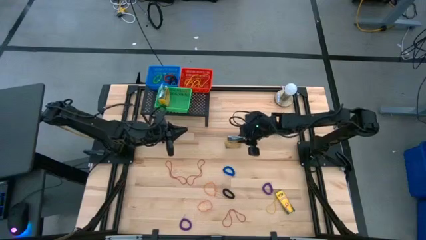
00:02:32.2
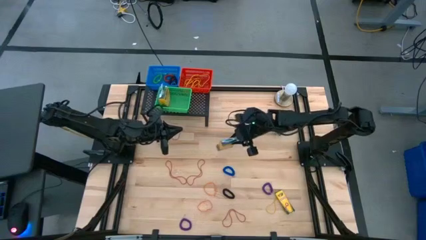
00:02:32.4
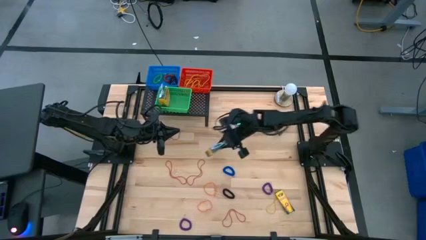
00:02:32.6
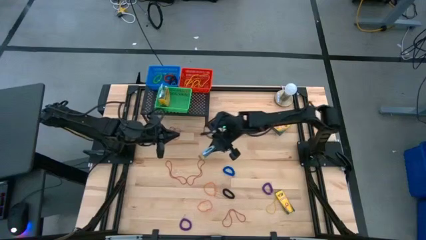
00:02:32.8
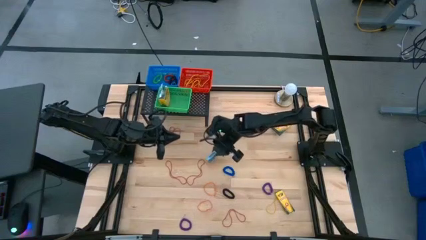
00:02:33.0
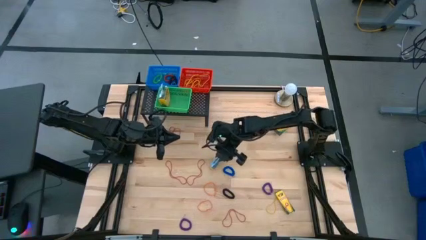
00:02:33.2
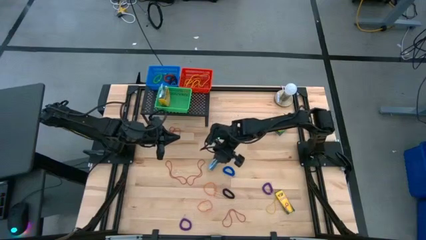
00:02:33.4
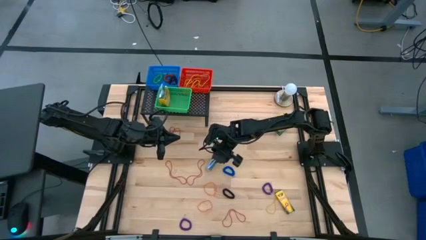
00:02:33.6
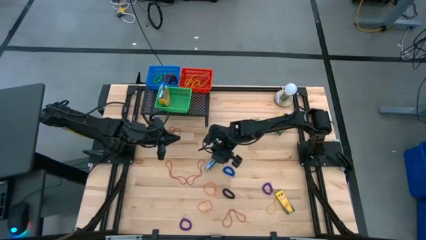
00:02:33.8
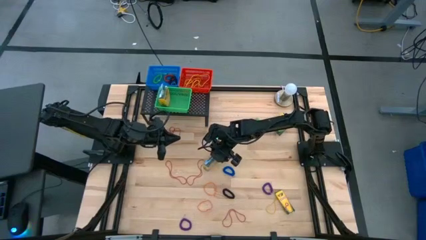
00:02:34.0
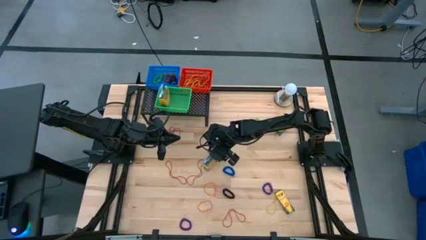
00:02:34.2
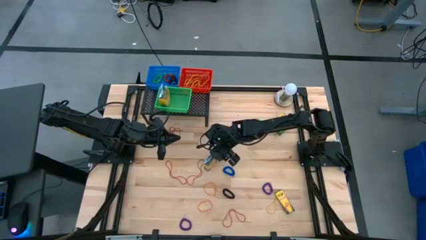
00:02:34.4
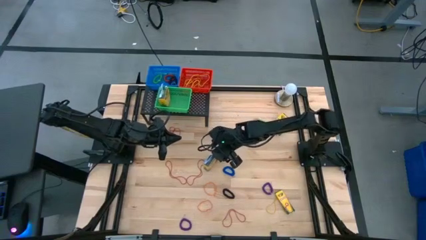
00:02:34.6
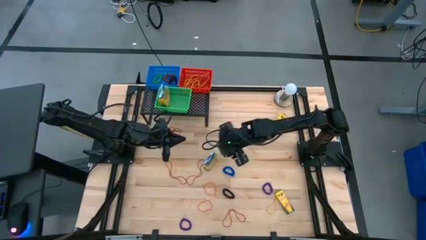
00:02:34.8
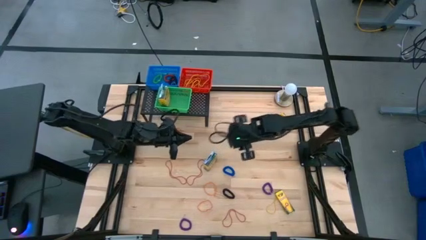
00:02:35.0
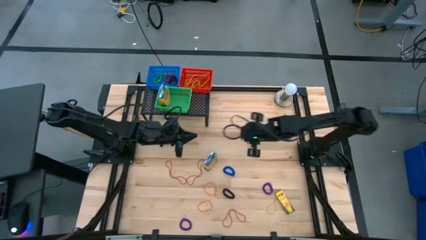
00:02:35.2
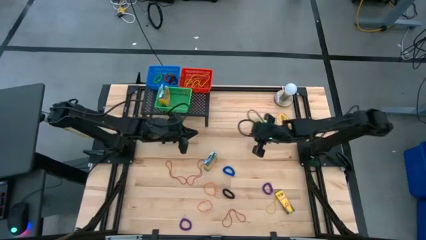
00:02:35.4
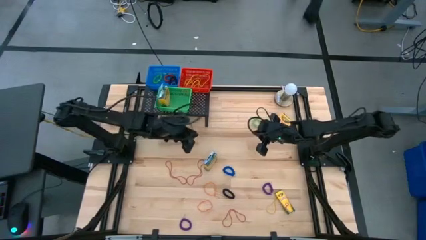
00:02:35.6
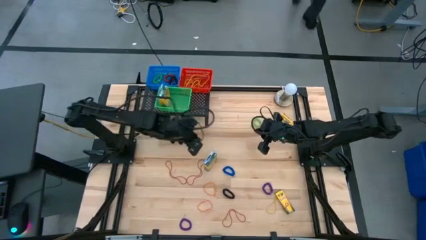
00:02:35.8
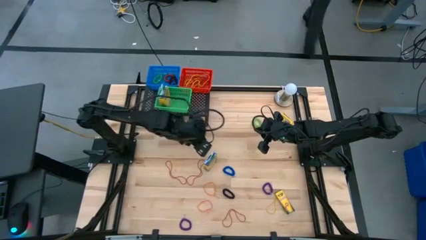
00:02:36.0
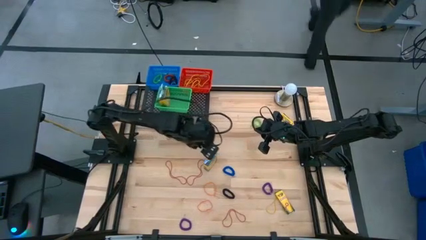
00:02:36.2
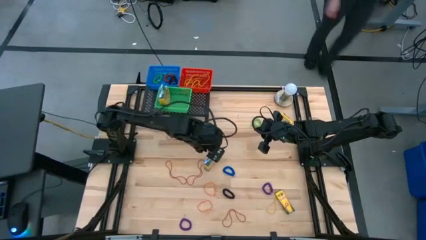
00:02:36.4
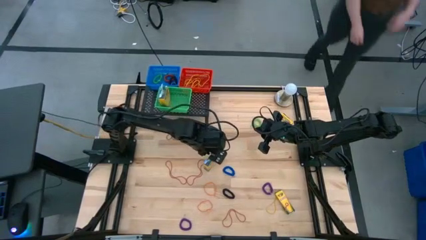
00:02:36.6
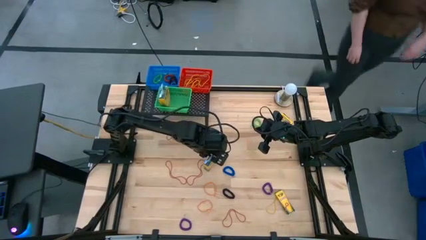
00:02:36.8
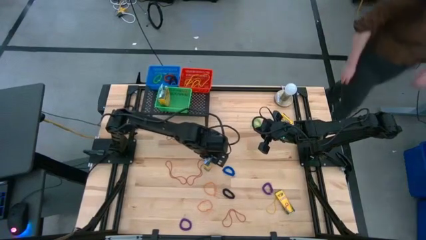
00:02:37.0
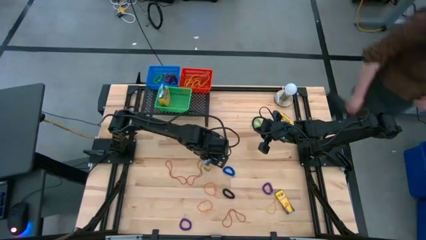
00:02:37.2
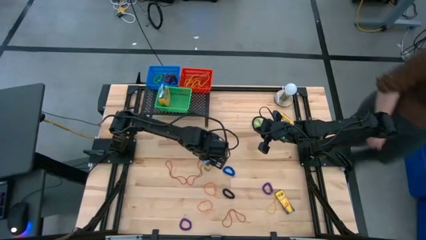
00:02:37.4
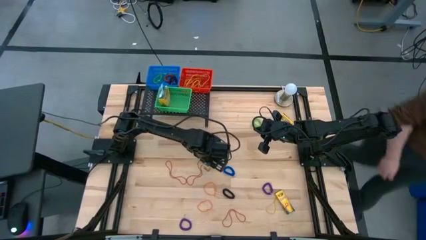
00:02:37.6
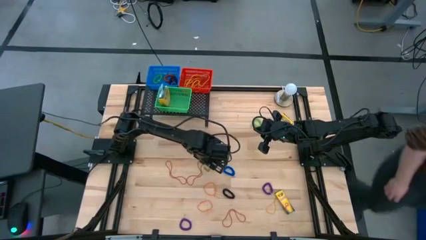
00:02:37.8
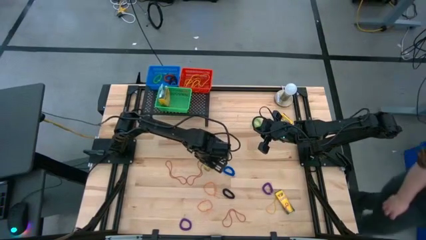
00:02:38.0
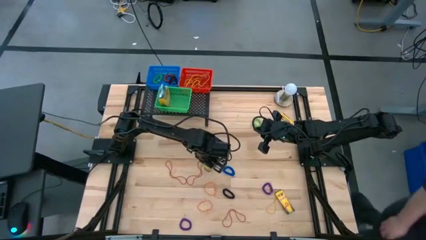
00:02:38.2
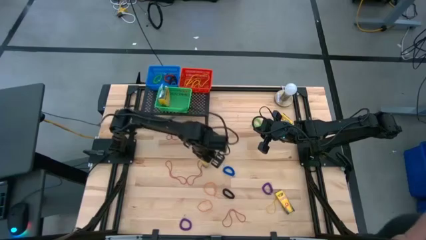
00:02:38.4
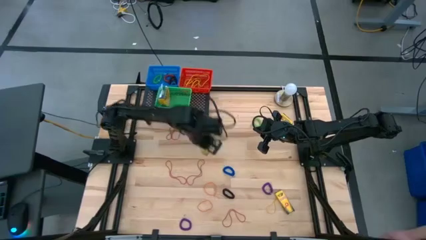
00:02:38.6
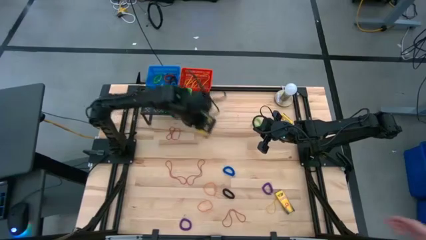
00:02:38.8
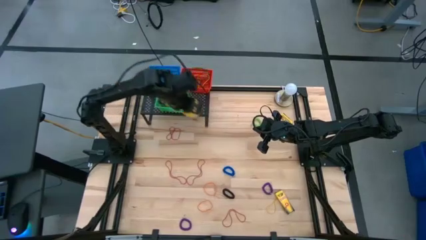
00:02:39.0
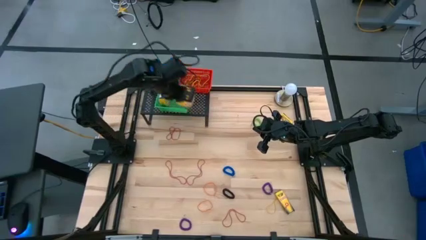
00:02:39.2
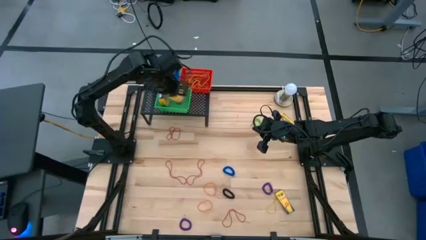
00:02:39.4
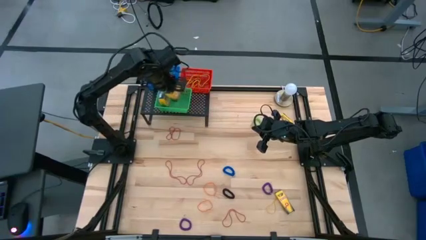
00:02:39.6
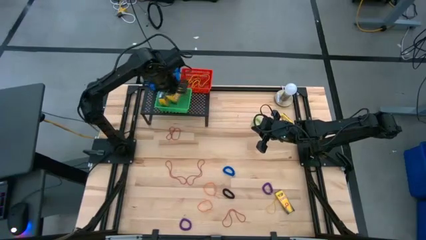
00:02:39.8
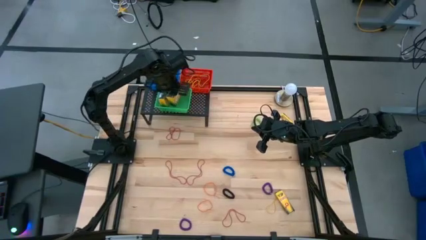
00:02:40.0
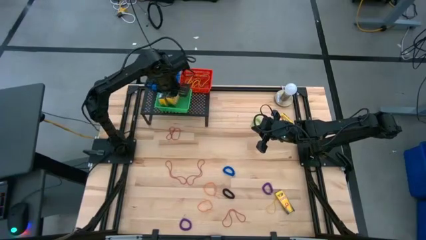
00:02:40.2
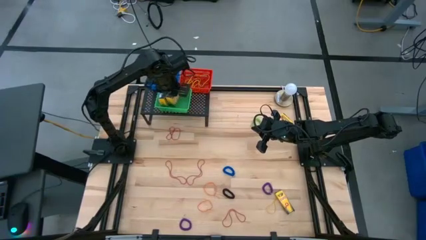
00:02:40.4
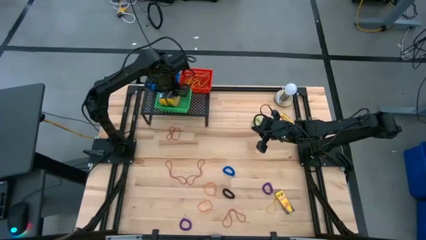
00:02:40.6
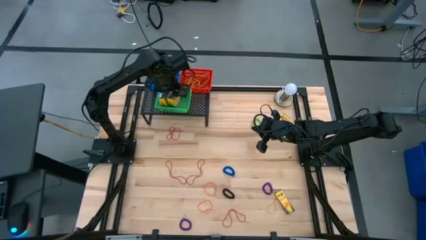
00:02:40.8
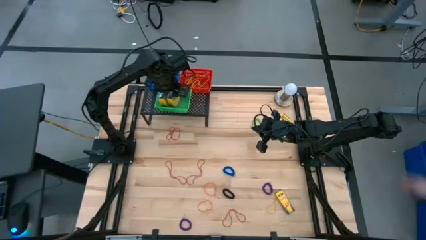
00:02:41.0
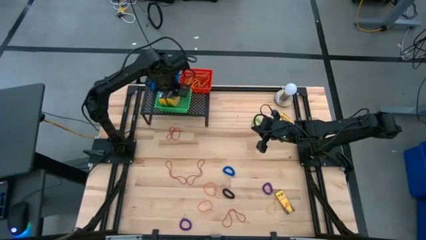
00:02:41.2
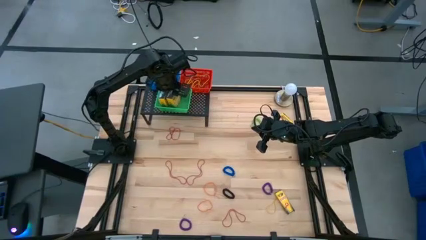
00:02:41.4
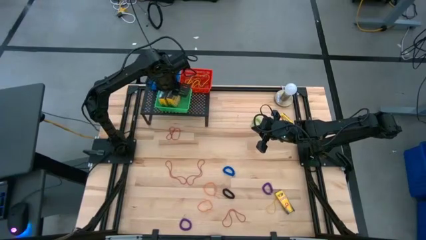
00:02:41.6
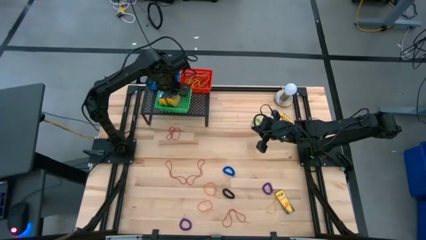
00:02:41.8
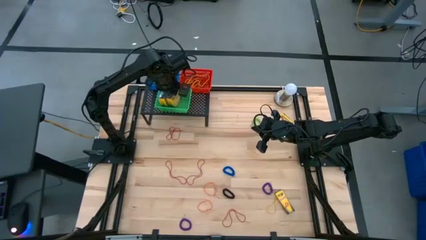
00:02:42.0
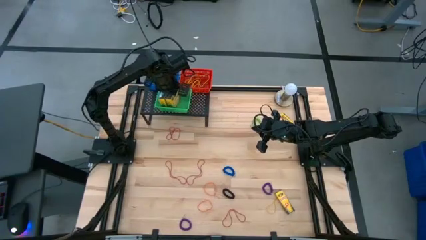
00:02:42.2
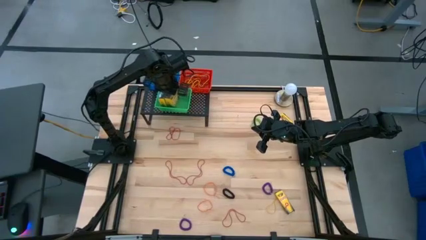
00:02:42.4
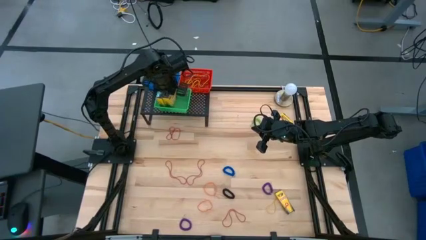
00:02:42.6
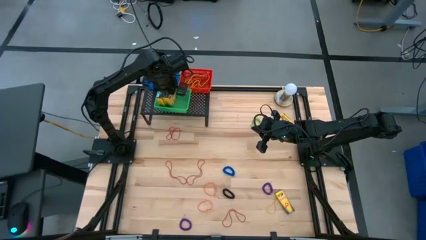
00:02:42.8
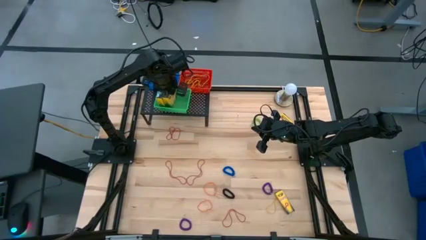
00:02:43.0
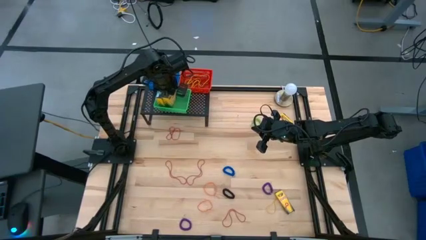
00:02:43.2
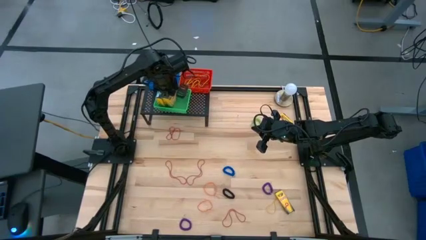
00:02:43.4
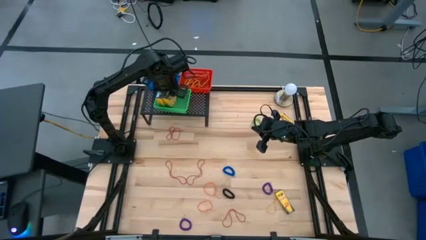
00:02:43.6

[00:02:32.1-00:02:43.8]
Task: Pick & Place Office Desk Supplies
Put the crayon box into the green bin

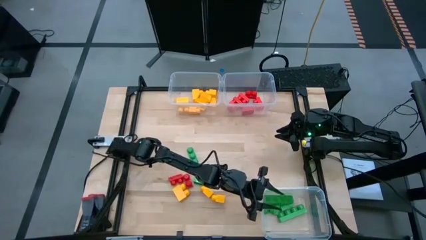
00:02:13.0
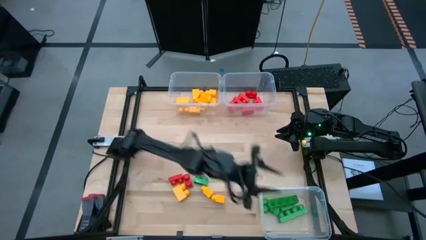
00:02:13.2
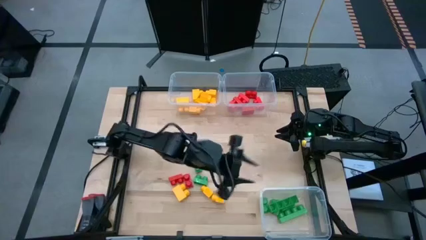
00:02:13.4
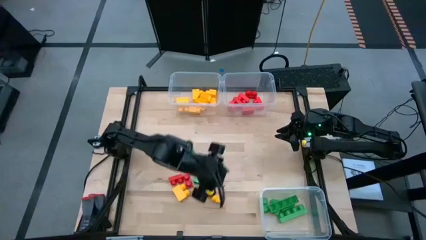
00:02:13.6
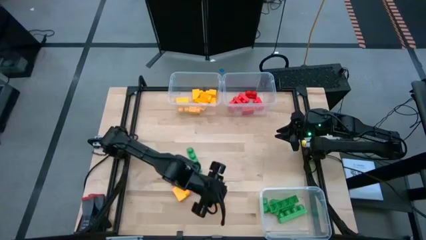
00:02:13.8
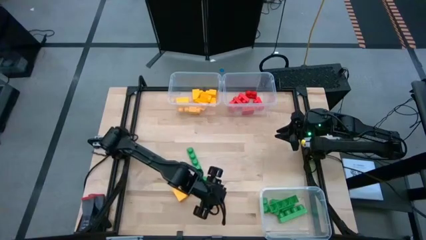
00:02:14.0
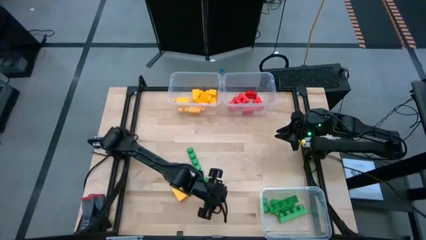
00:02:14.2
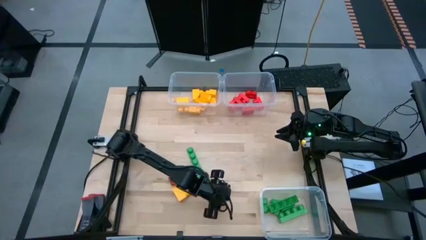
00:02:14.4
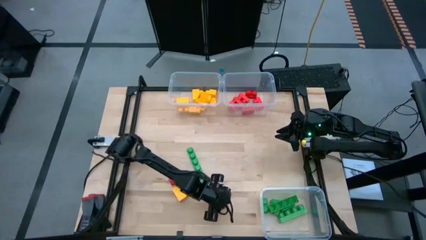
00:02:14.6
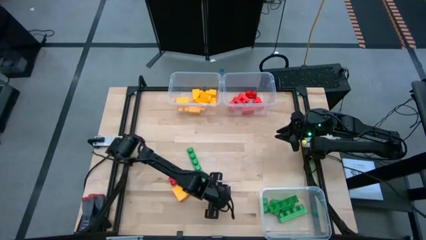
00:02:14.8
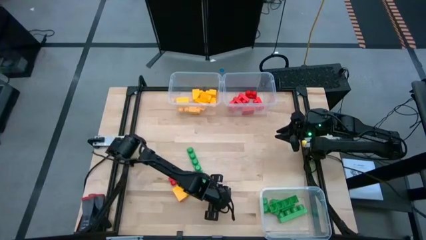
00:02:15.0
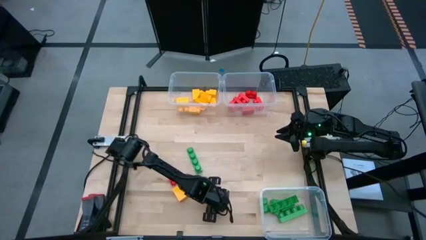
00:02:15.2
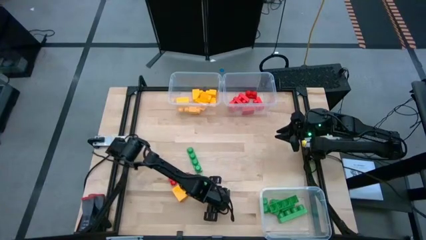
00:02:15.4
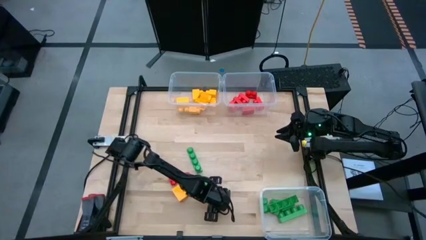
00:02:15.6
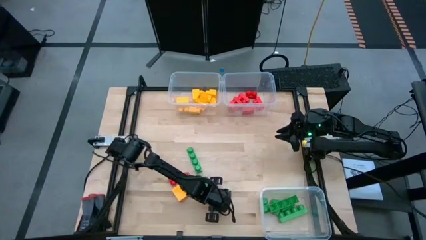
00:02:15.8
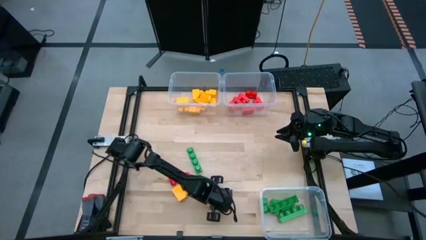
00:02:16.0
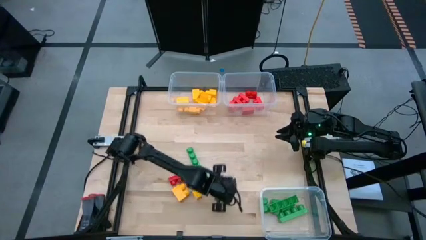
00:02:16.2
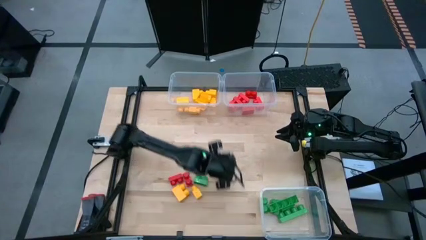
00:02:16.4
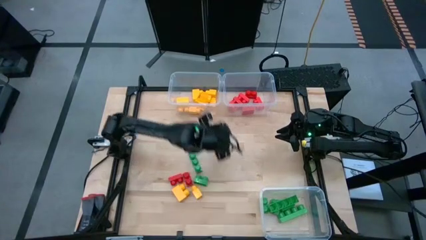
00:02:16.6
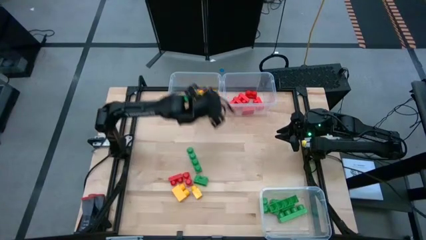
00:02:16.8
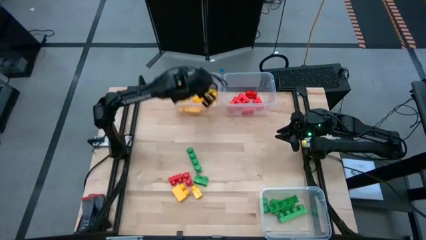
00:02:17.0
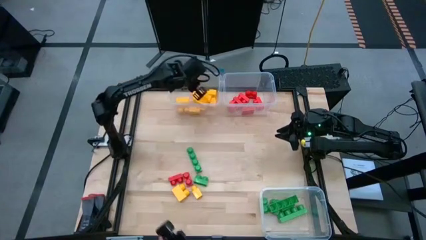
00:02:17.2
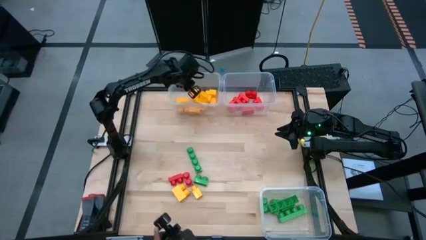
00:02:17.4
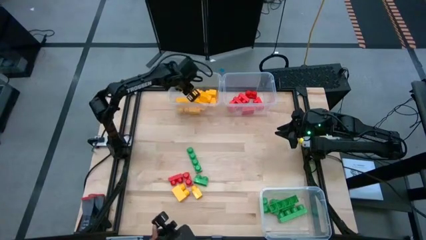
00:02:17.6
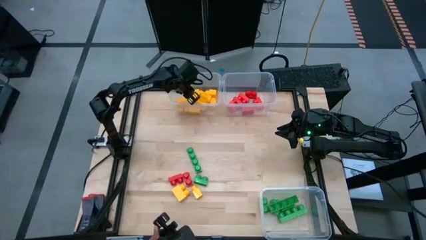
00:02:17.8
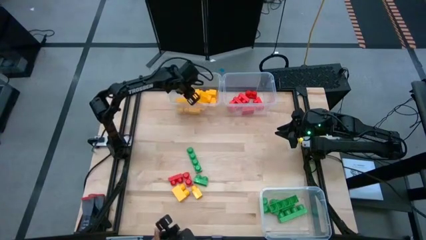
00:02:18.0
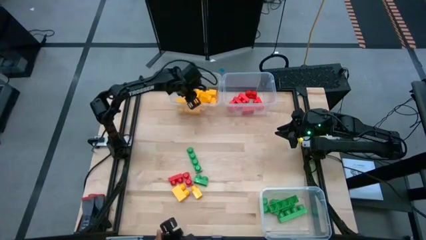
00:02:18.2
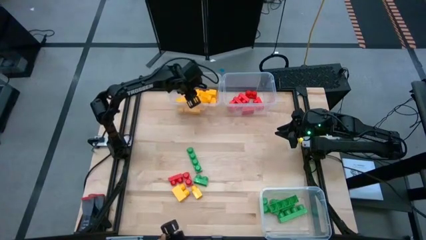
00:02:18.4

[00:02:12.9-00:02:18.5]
Task: Sort blocks
Put the yellow game piece into the top left transparent bin
